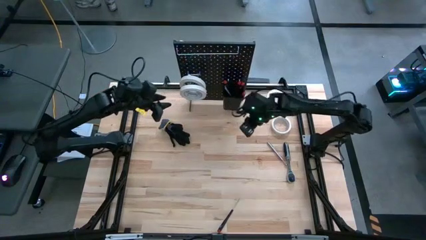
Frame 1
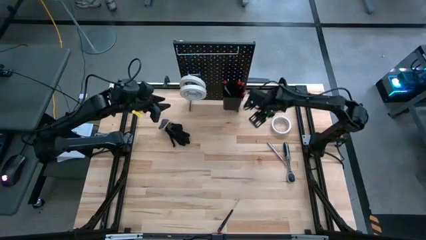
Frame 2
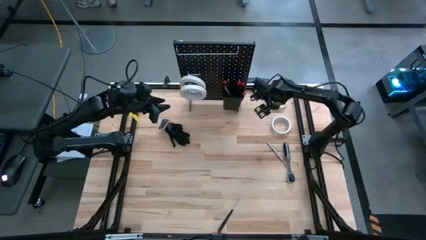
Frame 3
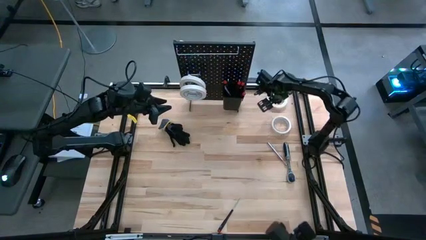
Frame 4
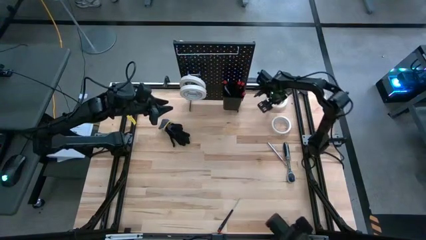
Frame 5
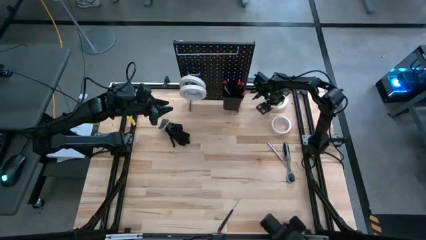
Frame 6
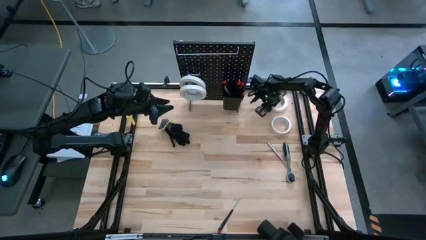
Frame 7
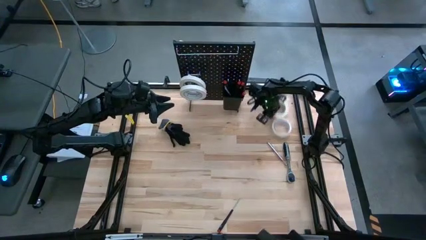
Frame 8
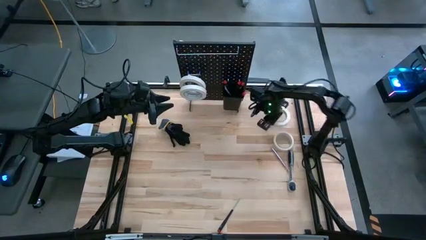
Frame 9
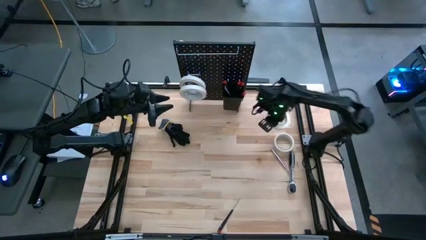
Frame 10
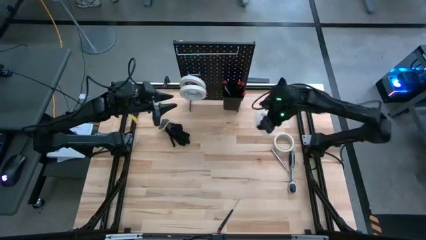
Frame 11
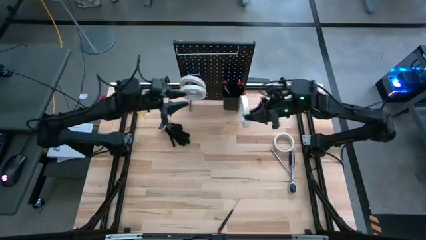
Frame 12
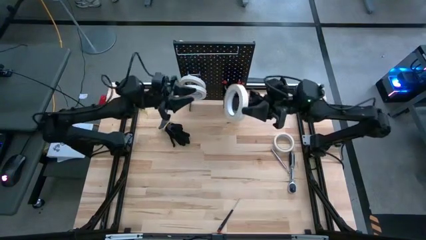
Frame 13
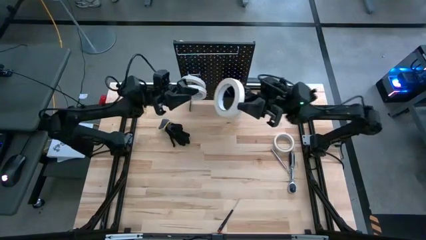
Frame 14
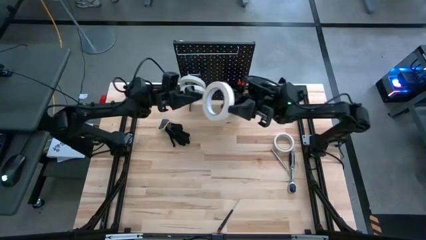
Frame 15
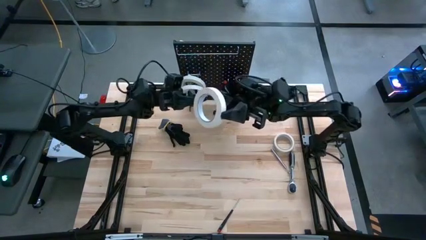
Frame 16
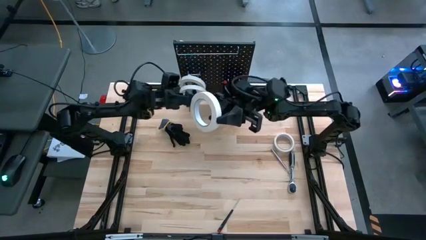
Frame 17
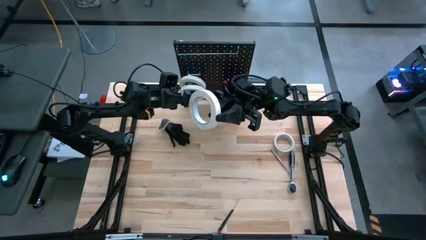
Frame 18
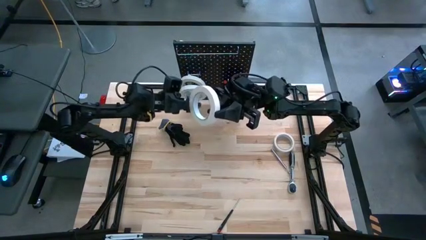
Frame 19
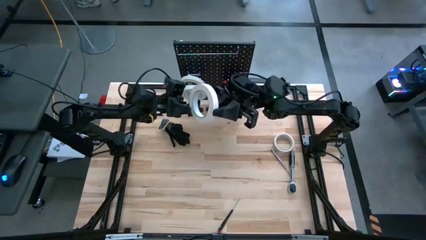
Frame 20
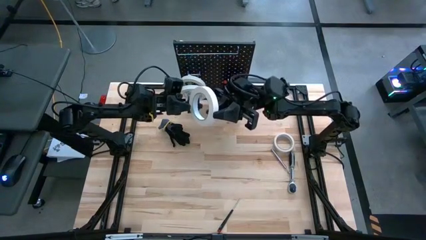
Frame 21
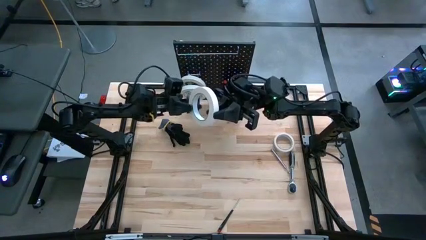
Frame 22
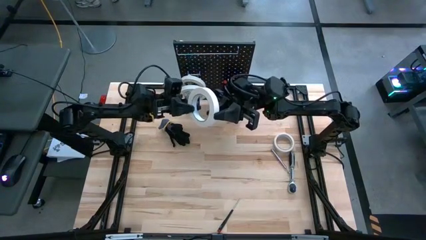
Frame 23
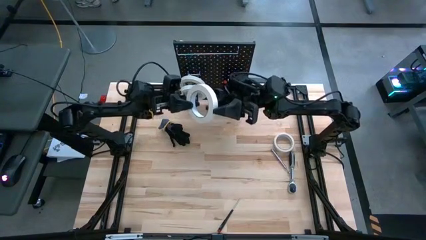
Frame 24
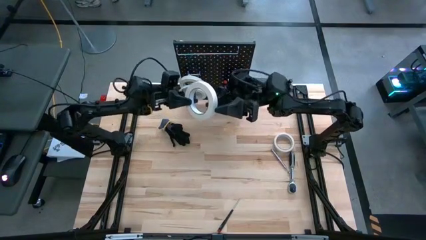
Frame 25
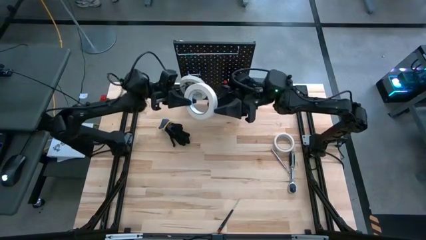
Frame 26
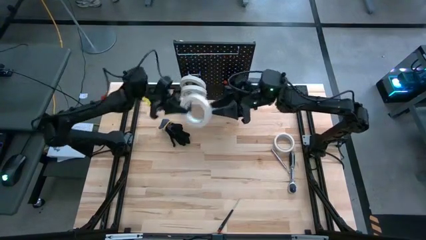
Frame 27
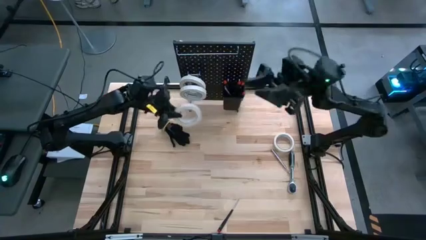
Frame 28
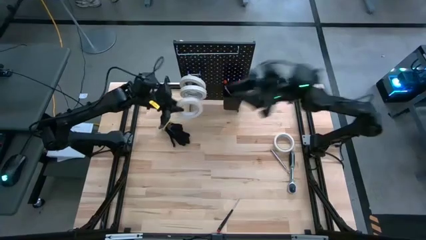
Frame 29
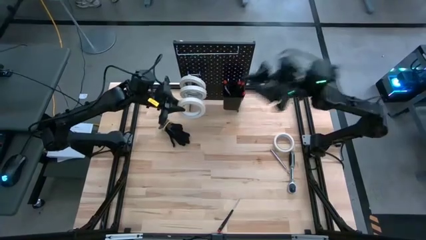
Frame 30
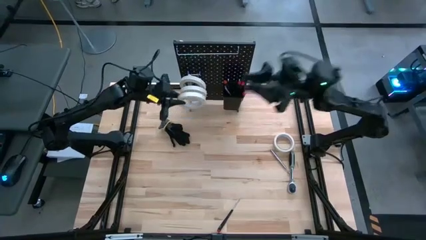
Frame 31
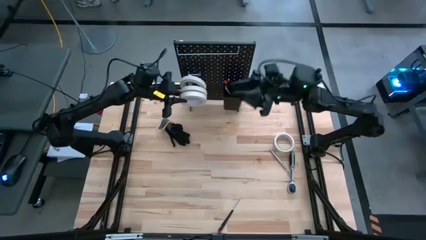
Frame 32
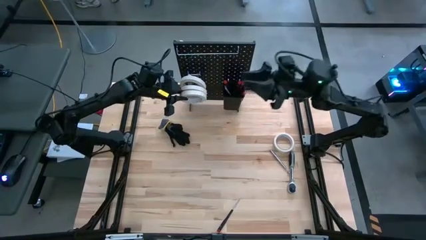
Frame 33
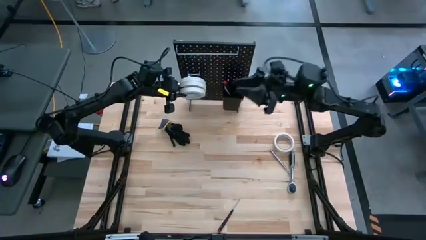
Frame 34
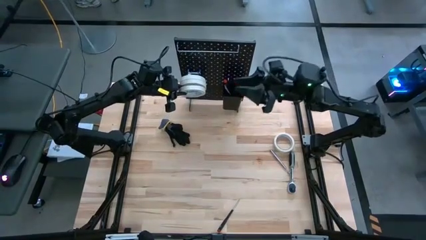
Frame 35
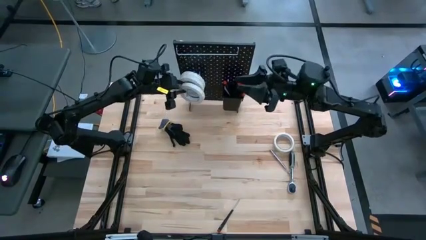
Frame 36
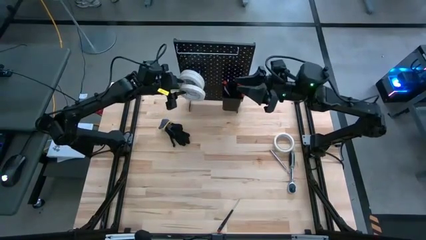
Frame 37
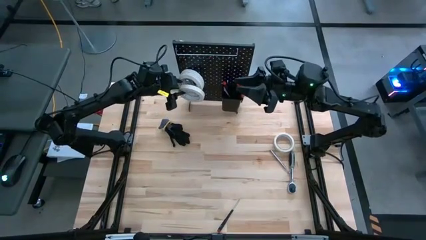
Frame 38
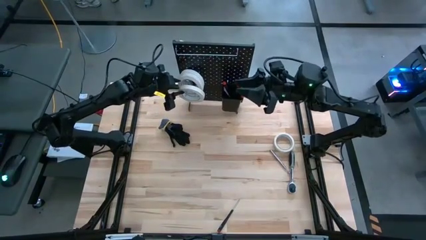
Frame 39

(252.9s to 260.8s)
Task: Hang tools onto peg board
Hang the white masking tape on the peg board

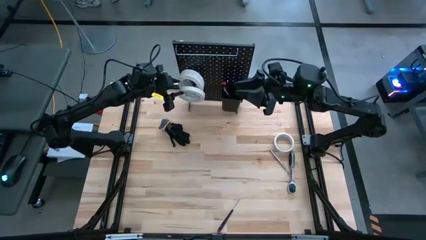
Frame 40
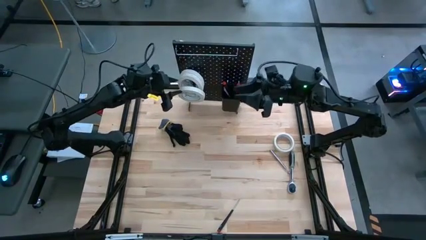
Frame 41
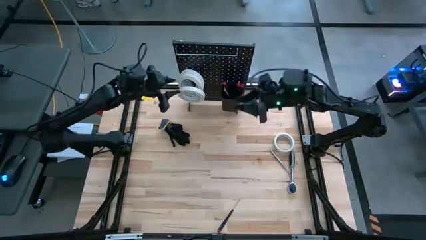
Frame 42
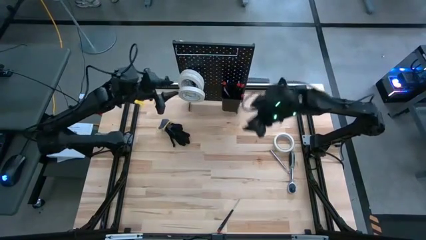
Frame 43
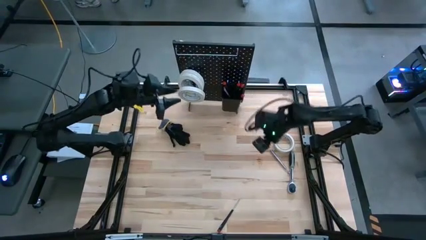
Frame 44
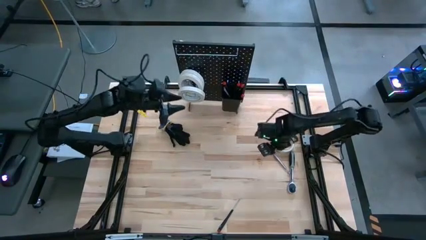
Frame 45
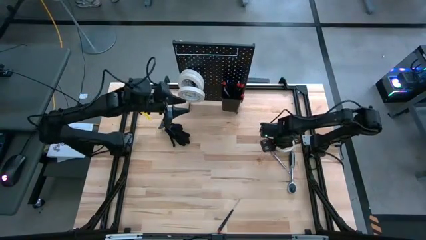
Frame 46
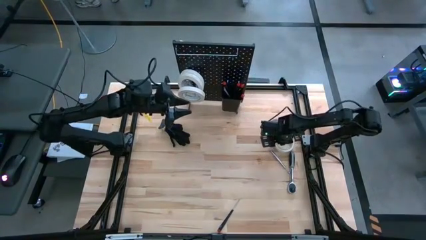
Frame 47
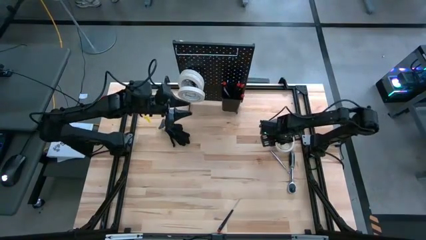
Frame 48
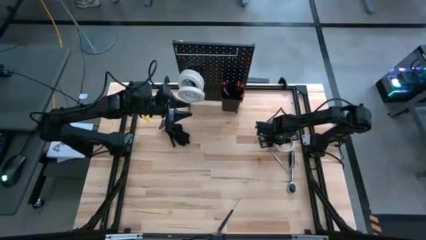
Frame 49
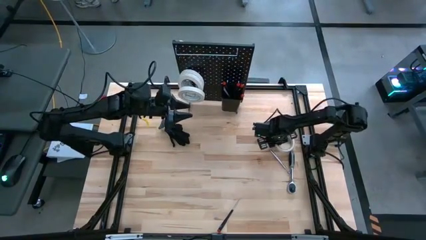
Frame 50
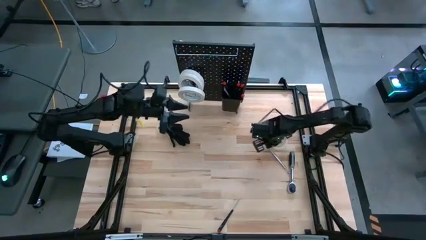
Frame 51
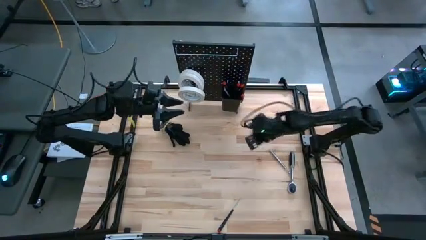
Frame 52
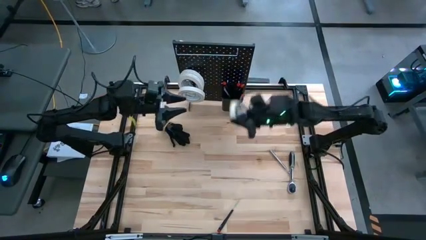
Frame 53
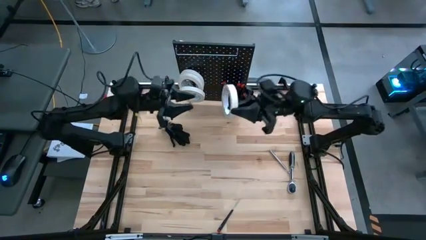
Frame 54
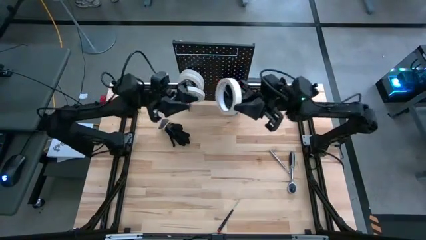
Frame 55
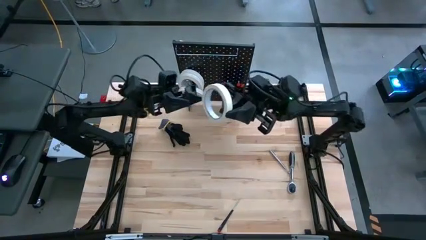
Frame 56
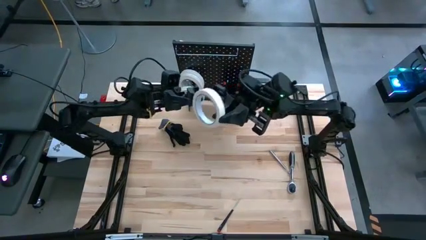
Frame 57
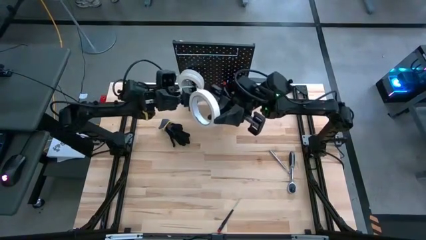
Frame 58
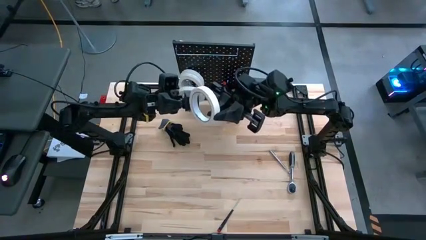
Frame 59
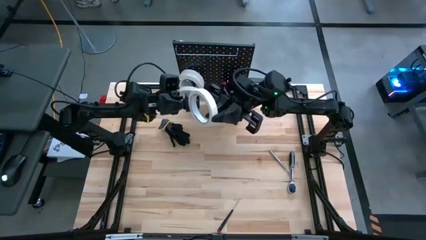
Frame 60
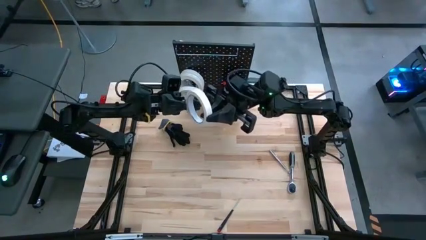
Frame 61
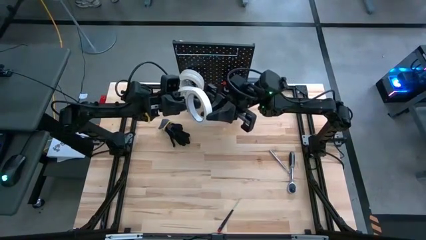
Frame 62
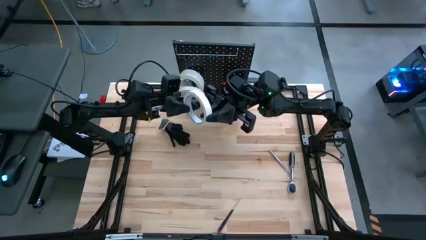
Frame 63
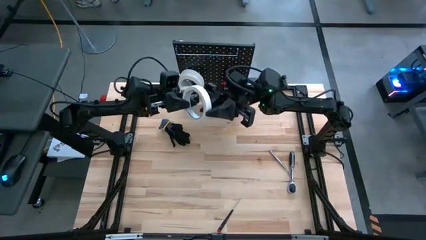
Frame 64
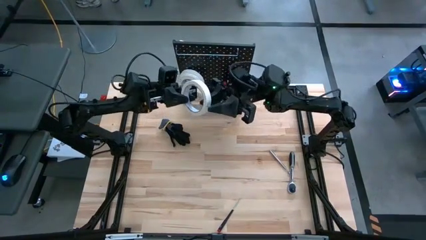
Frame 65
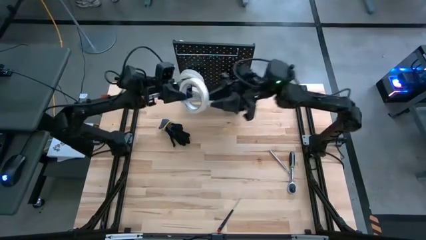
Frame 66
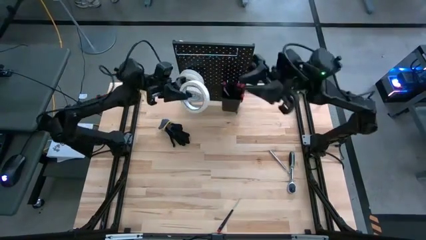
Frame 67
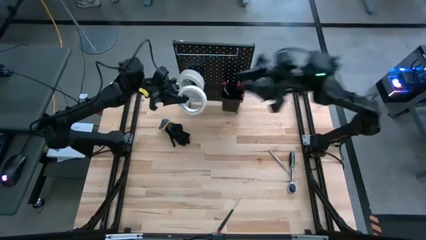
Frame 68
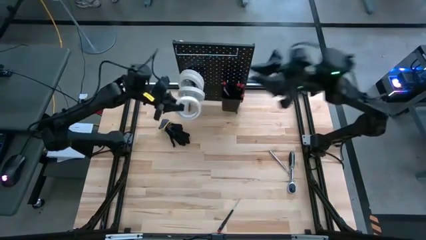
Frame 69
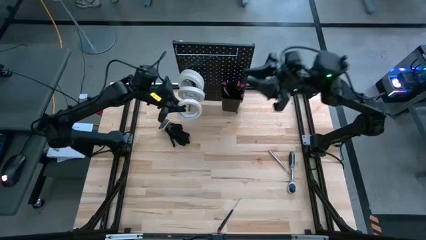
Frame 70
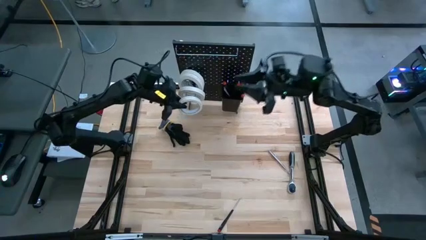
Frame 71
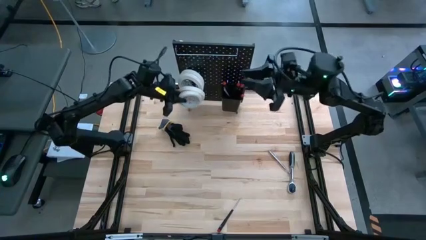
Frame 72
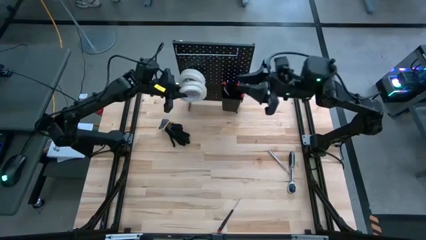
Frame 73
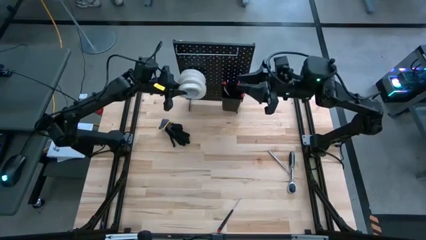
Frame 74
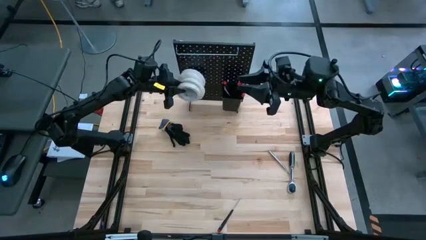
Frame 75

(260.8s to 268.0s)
Hang the white masking tape on the peg board
